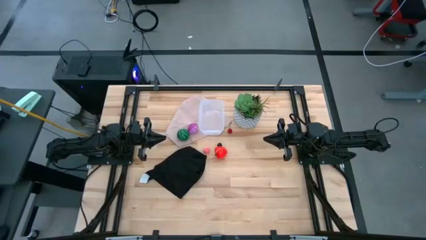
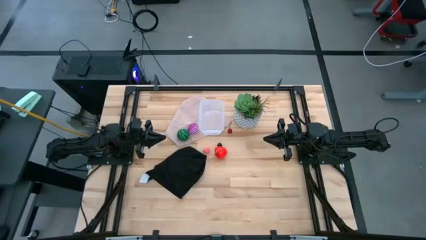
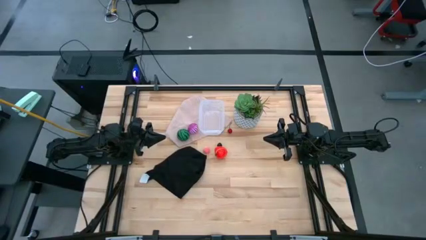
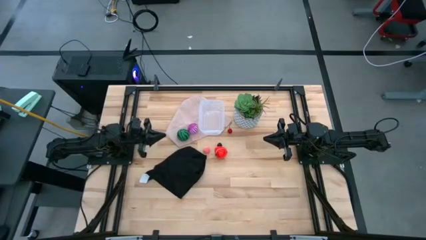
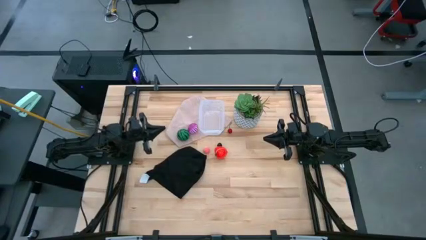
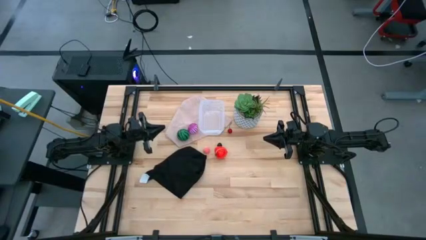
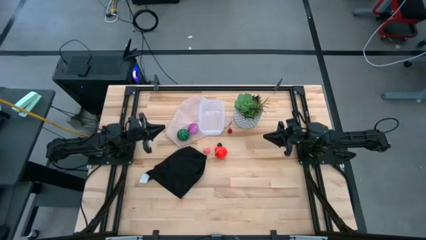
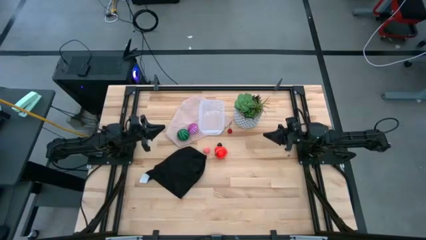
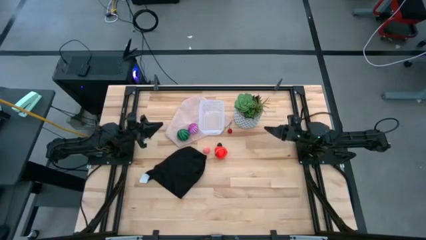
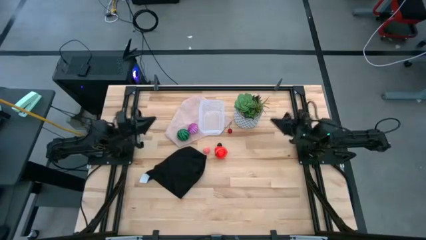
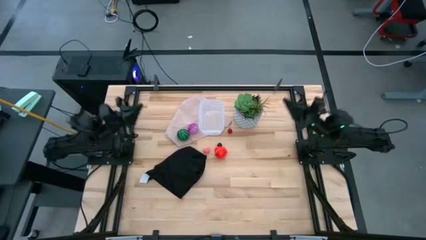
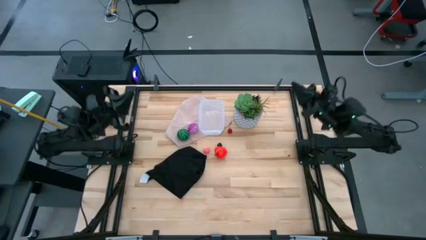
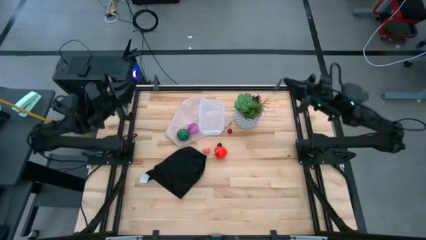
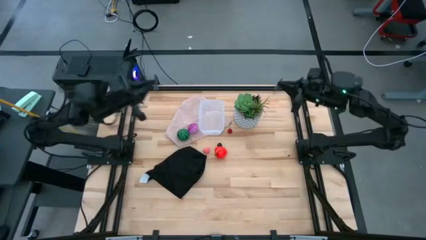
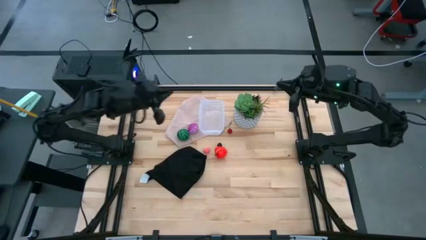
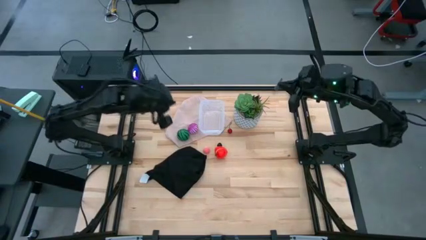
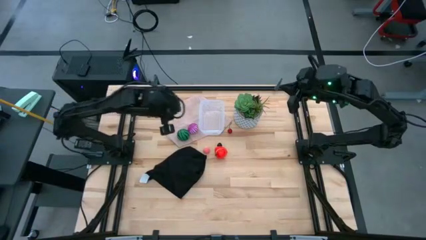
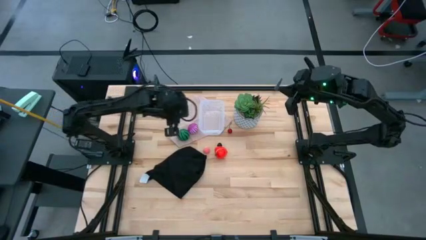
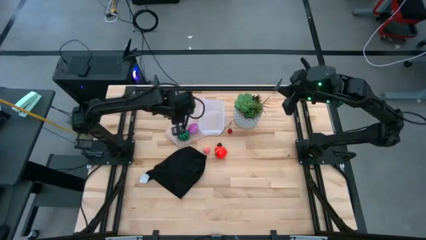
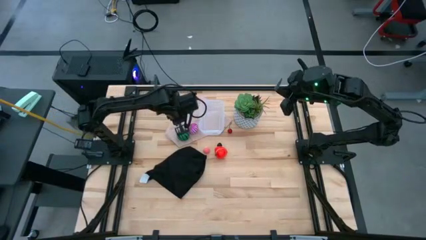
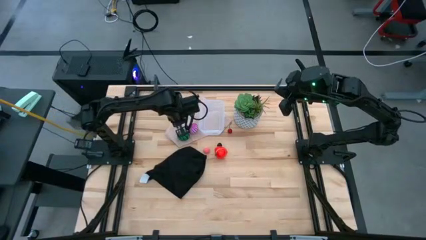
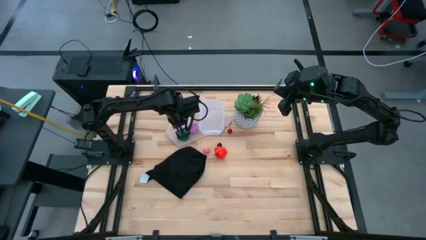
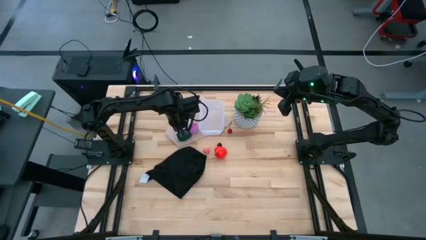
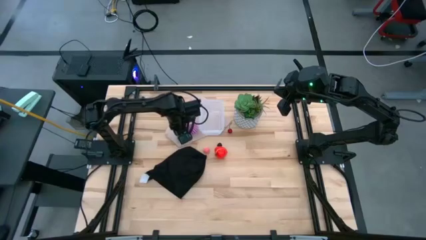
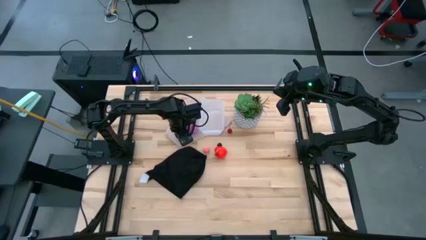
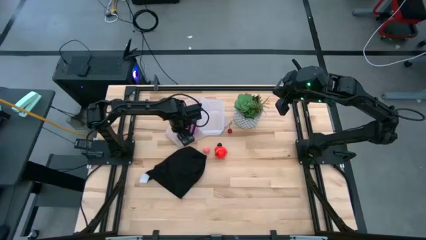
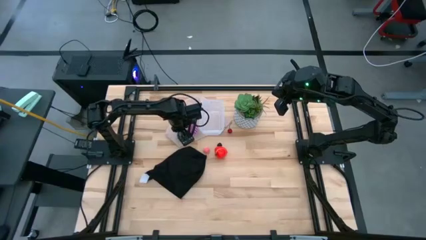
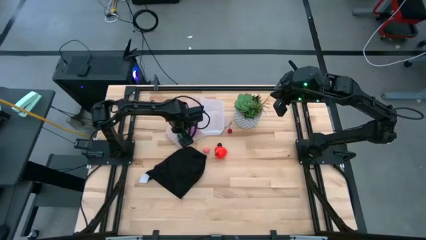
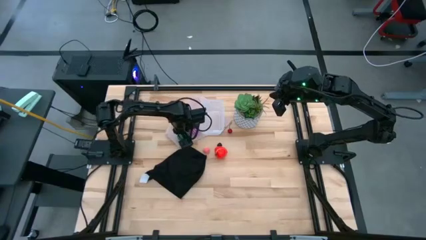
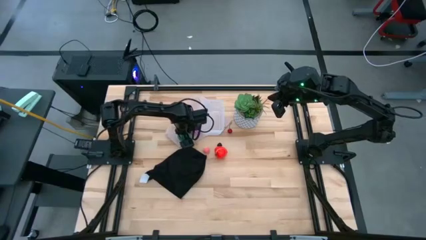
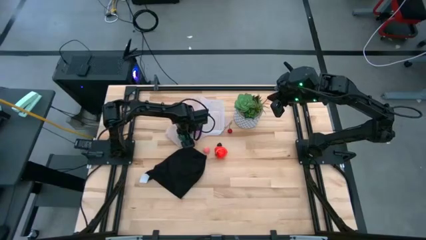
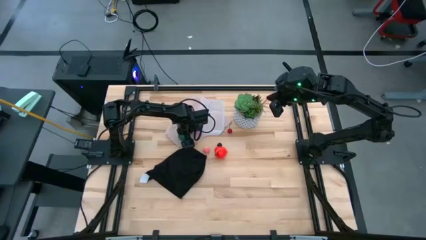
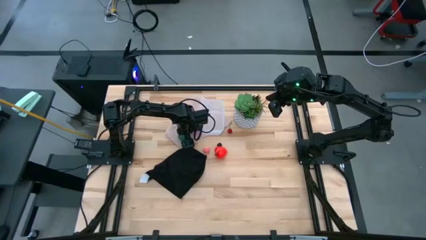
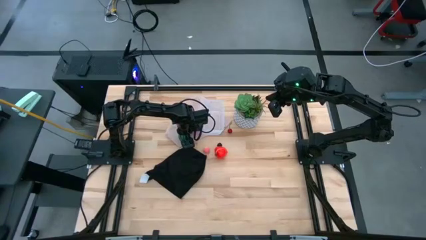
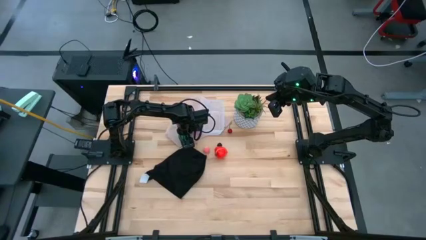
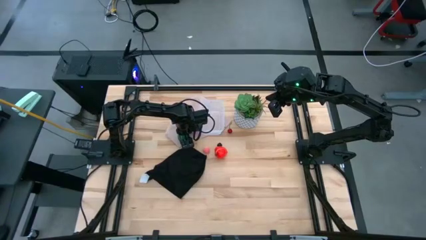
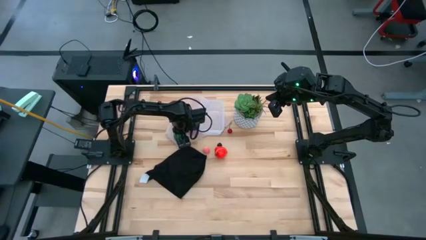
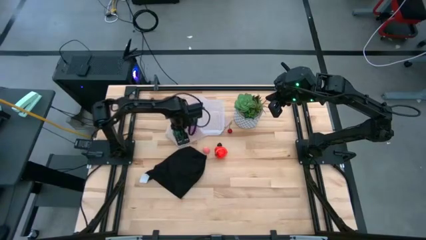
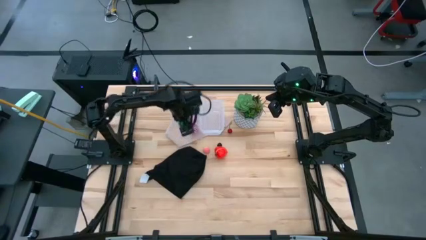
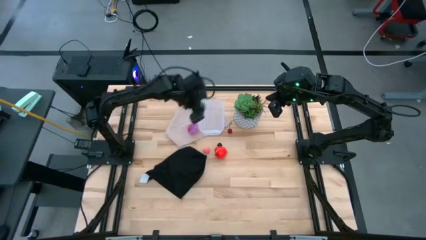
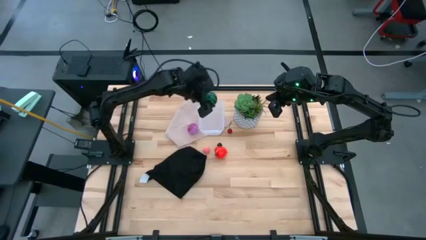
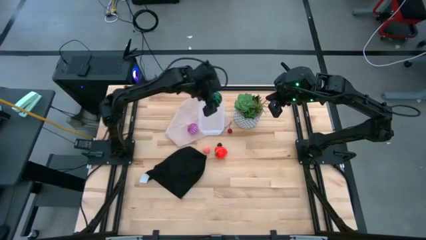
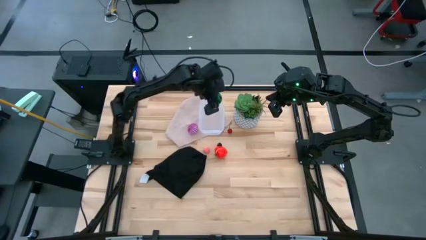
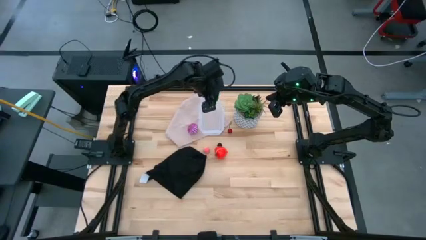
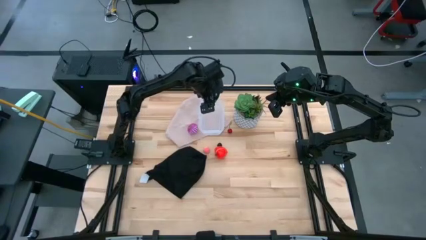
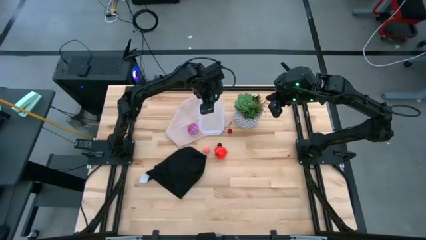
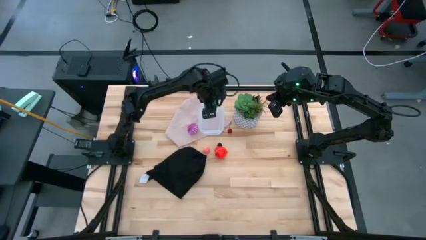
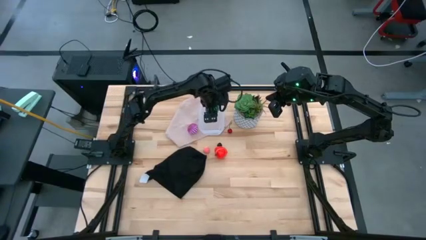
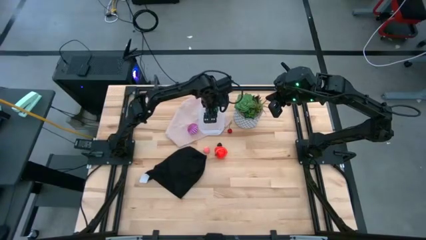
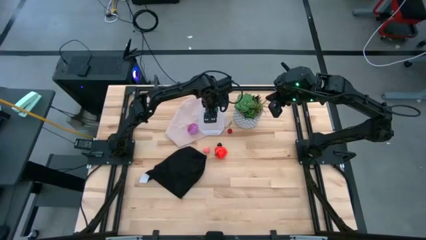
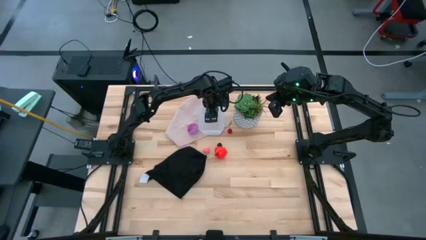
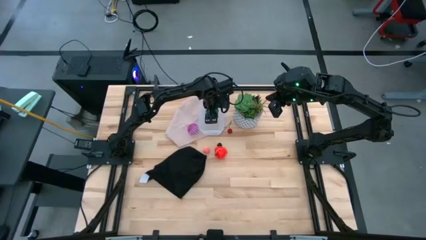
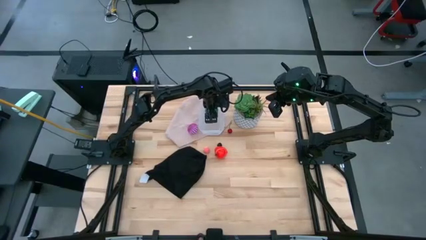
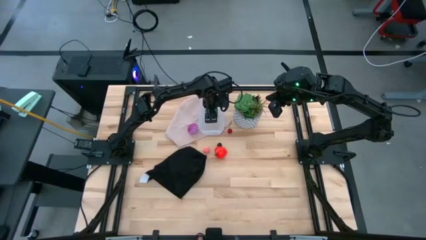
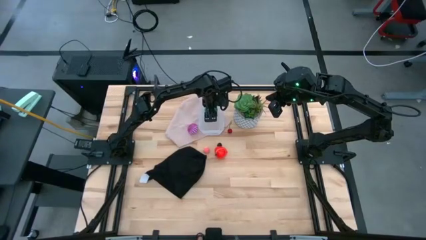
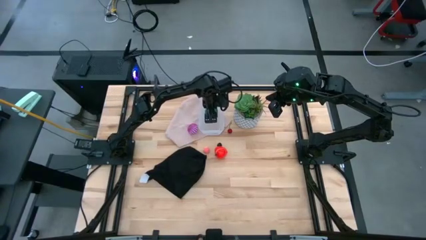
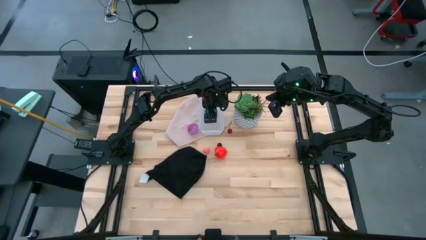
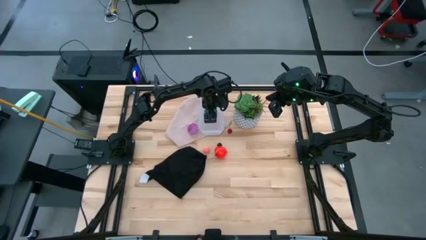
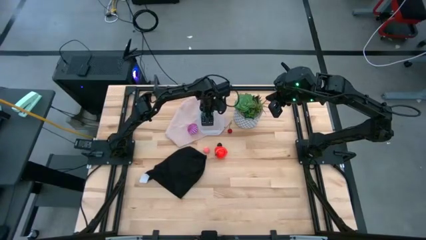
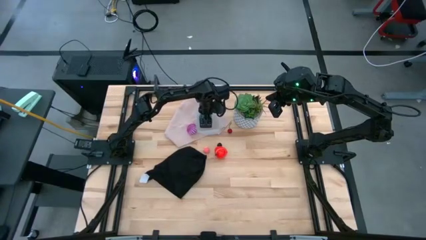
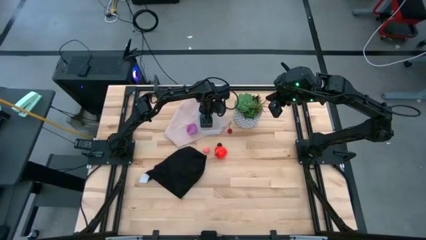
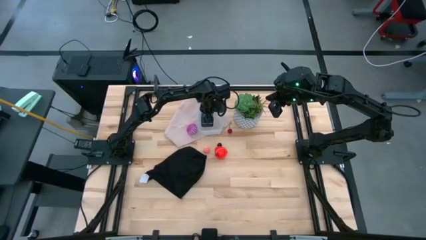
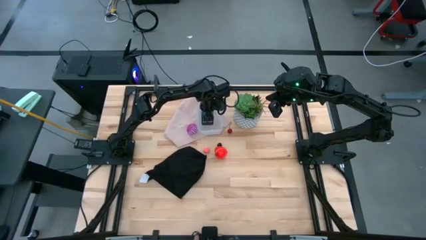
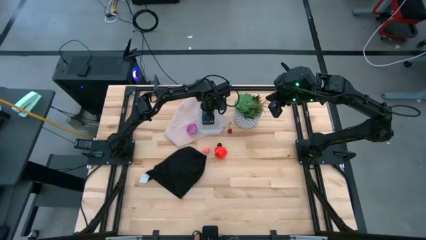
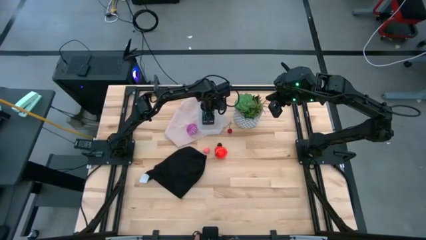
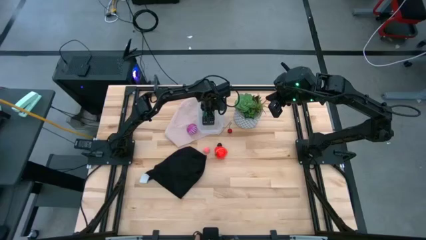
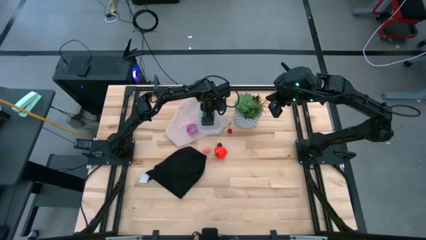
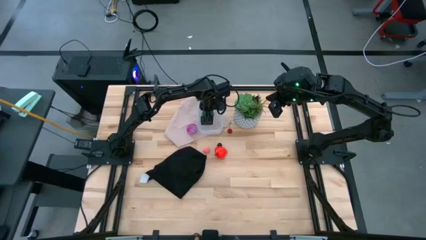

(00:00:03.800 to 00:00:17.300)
Task: Pick and placing Produce into tupperware
Put the watermelon into the transparent bin
